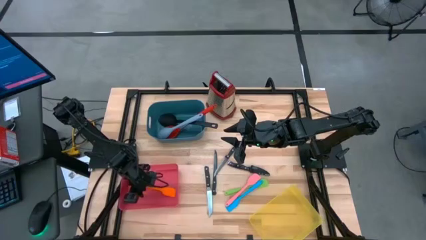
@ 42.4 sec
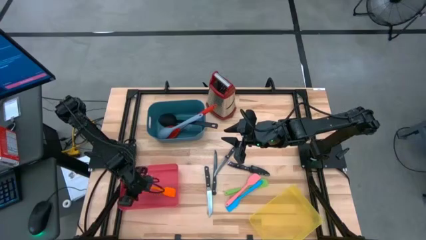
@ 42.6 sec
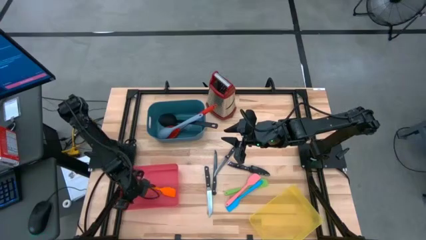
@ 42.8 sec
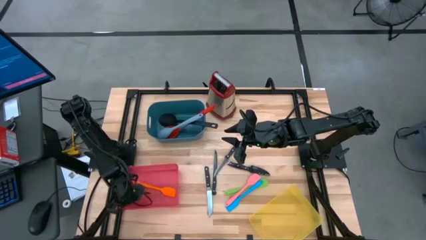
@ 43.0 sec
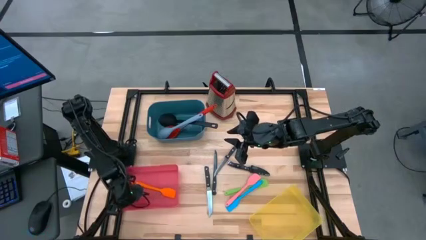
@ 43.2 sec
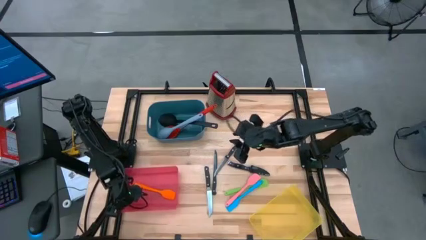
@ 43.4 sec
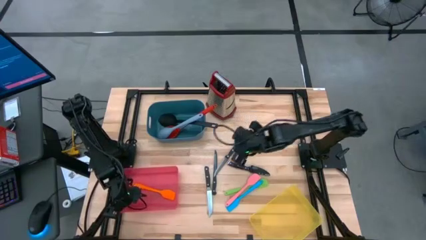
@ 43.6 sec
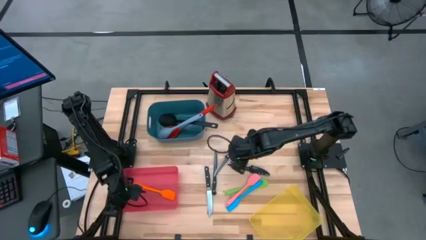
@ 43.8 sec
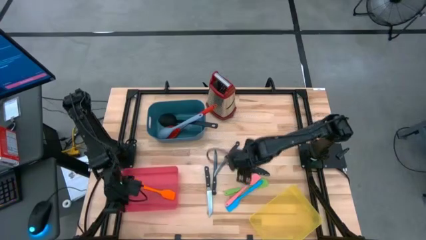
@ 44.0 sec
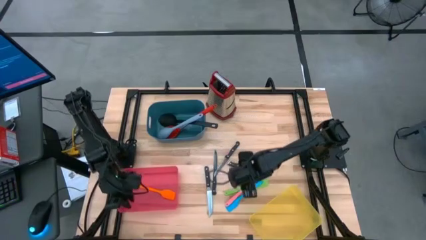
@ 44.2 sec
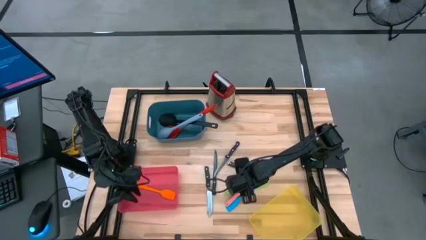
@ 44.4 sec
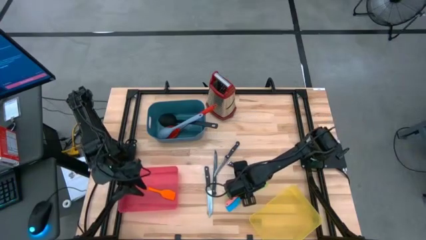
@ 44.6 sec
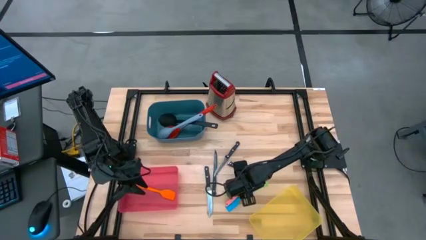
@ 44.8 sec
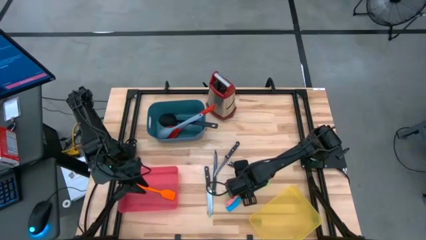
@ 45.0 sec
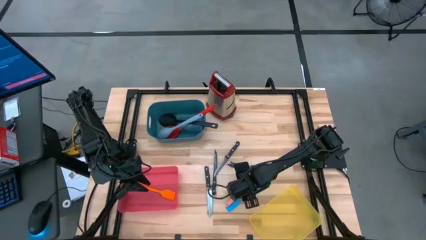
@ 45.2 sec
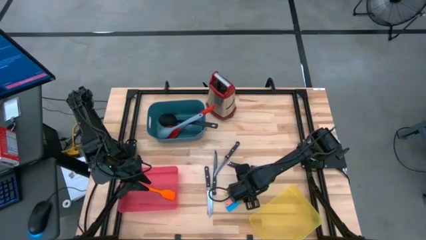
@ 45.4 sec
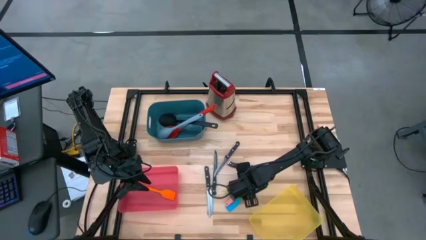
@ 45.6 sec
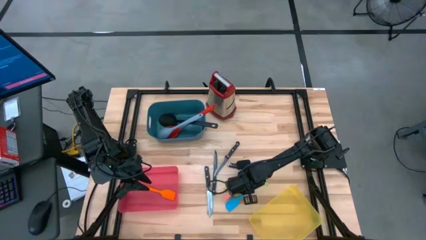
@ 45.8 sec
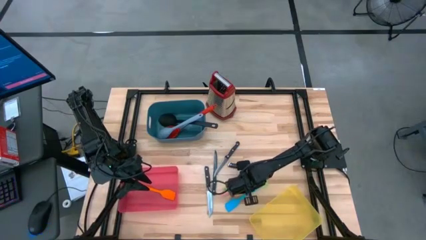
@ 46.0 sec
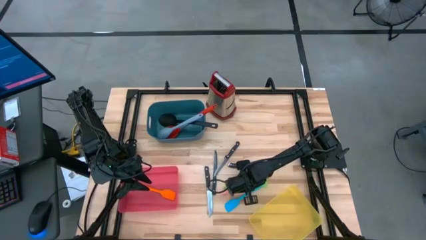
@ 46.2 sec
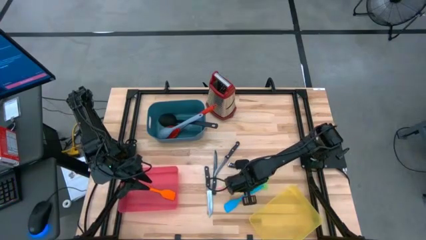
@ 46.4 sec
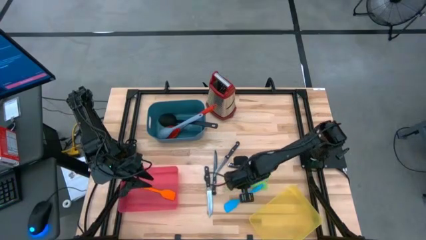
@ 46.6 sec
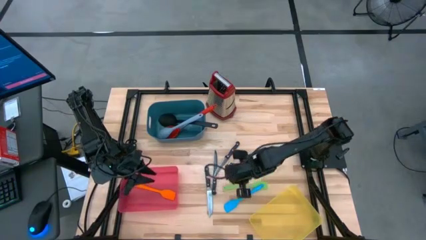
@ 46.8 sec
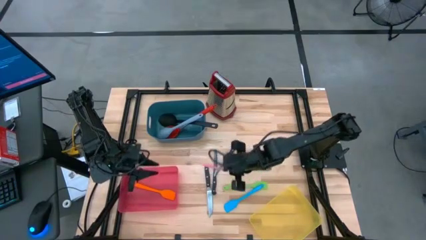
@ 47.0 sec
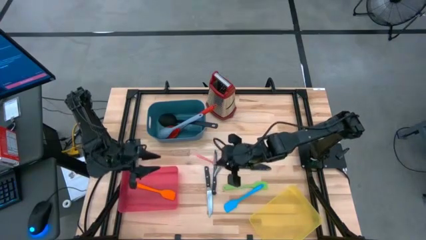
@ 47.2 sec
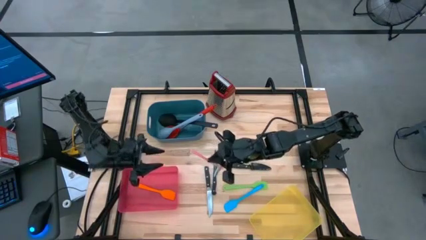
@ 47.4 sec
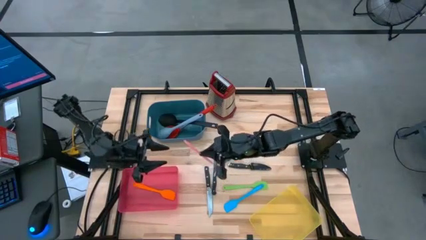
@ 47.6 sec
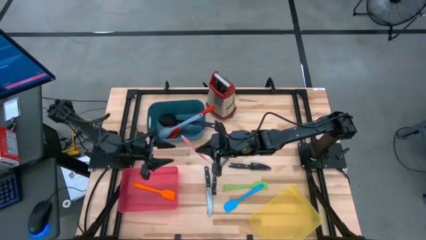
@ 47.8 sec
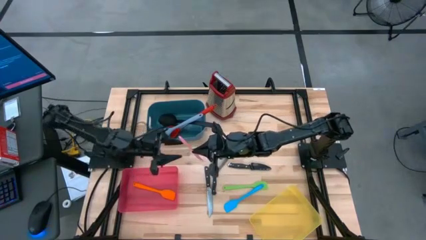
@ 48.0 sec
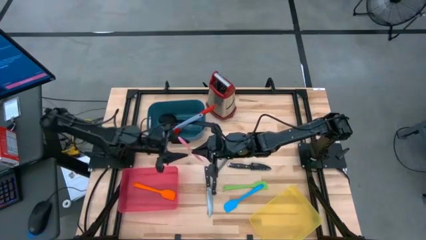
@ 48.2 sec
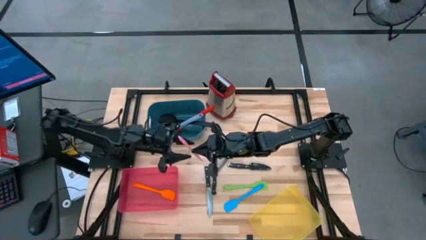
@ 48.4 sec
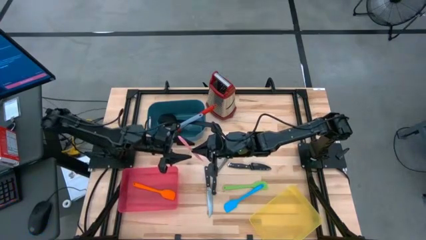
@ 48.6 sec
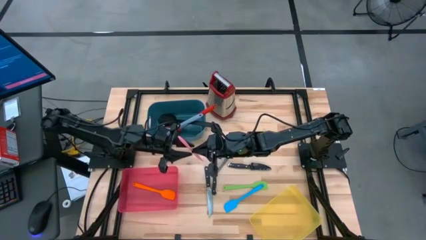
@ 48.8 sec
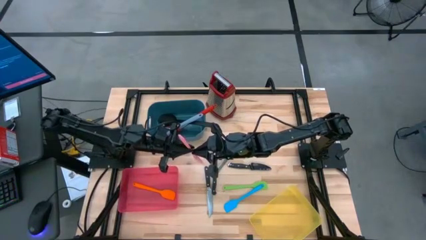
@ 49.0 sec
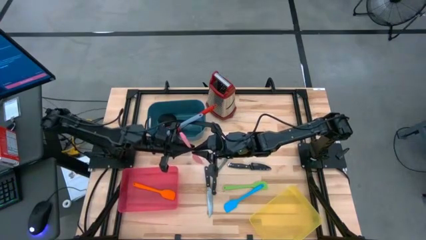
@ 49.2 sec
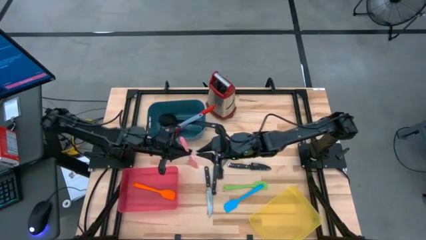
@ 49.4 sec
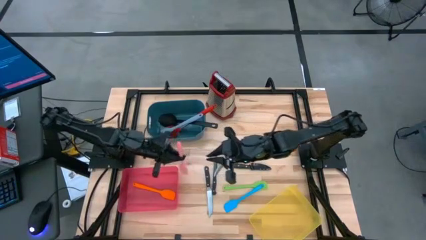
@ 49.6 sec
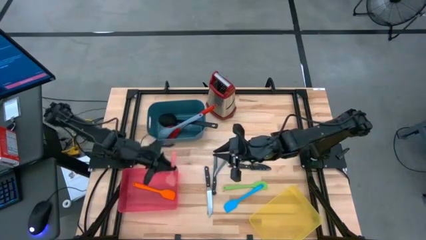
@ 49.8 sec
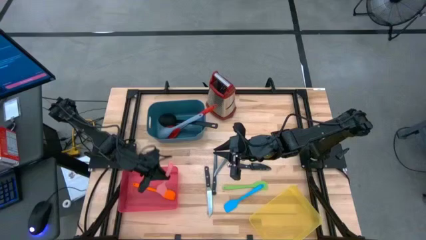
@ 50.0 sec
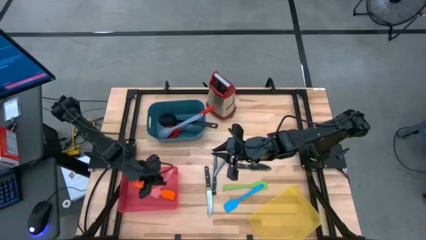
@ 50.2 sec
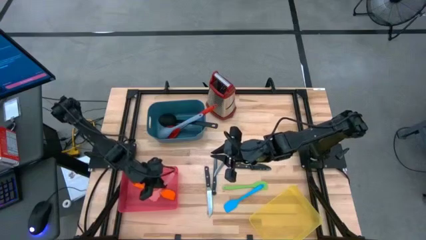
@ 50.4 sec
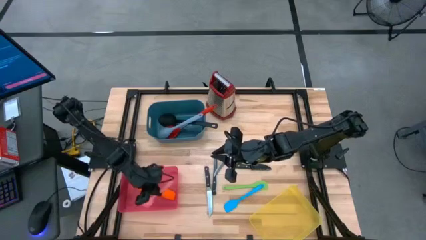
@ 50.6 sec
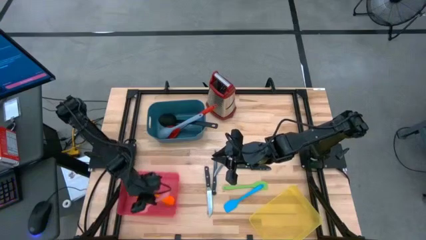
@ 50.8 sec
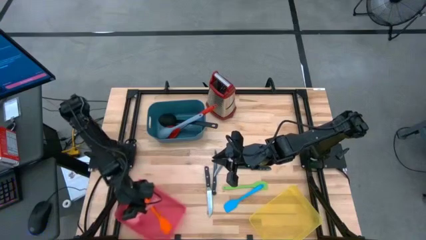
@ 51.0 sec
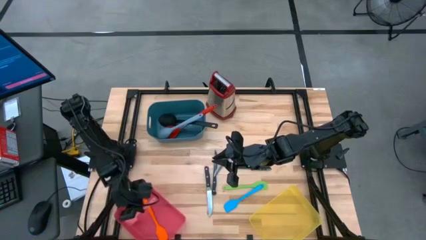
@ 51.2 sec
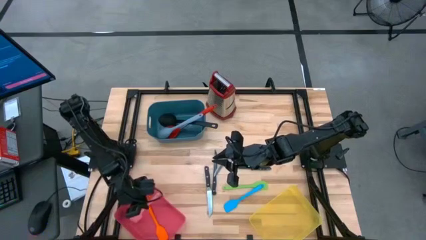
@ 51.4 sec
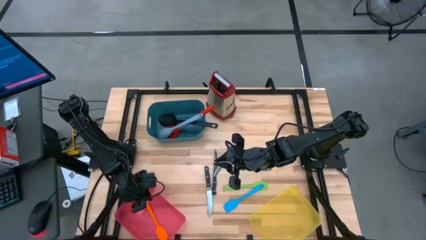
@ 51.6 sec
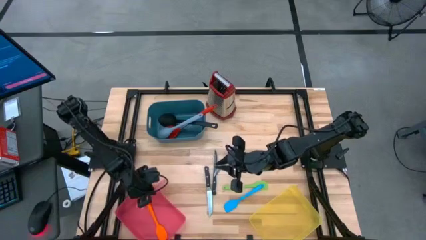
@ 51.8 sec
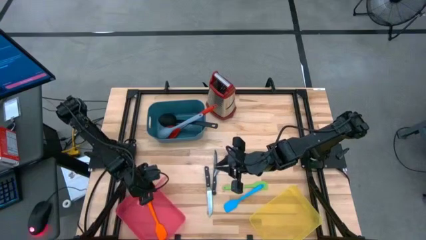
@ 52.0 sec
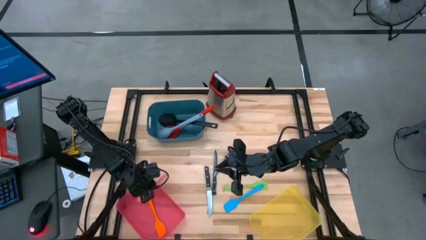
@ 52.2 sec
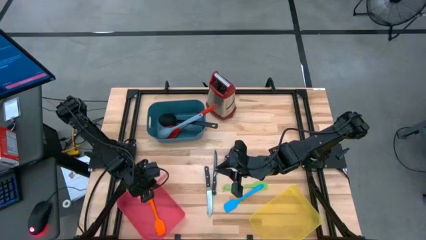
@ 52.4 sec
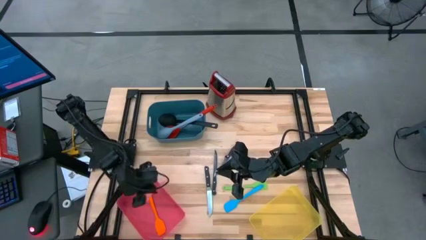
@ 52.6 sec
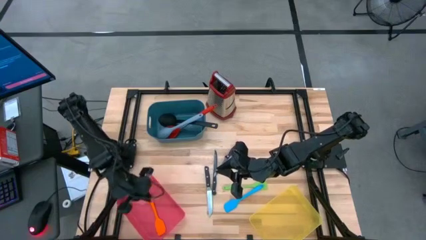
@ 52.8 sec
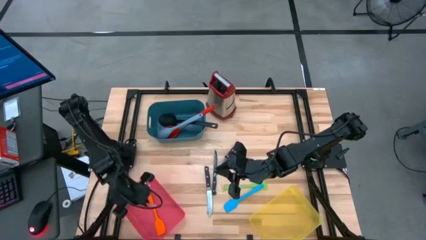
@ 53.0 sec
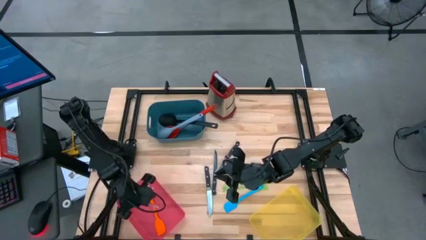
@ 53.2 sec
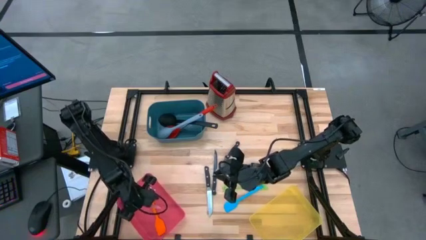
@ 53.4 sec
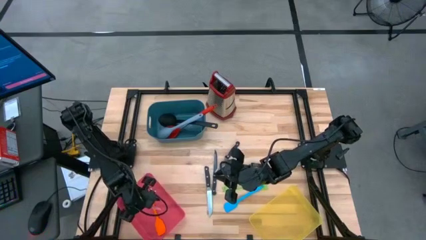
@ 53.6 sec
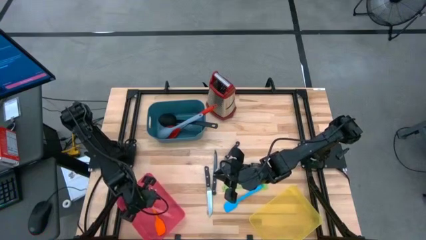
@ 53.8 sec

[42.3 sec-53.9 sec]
Task: Pick & Place Kitchen Items
Put the pink spatula into the pink bin

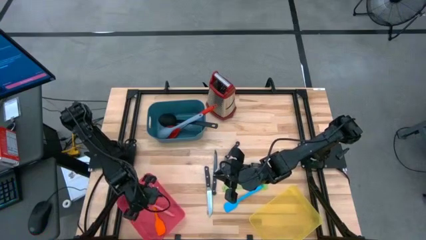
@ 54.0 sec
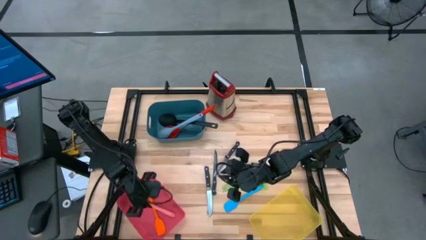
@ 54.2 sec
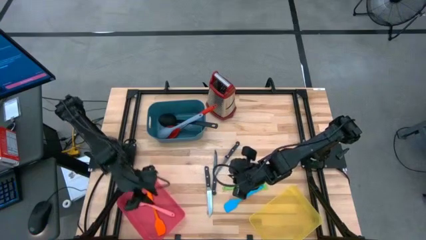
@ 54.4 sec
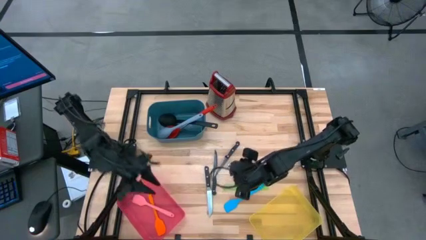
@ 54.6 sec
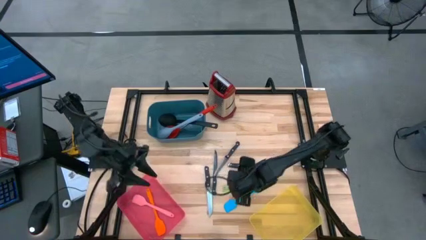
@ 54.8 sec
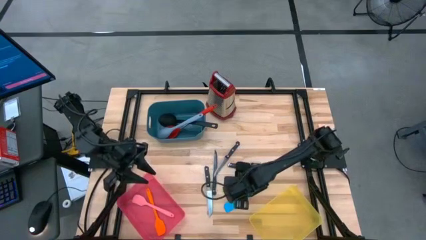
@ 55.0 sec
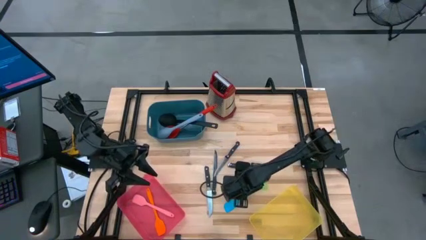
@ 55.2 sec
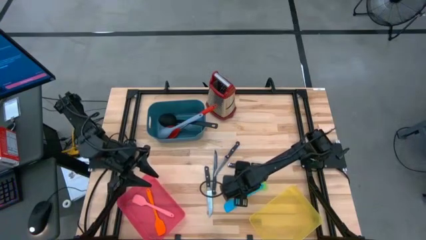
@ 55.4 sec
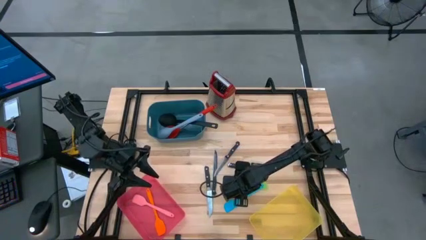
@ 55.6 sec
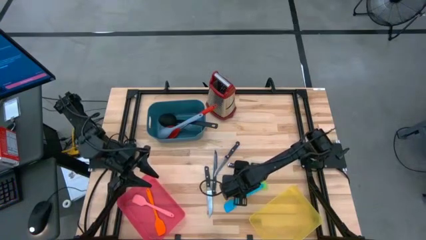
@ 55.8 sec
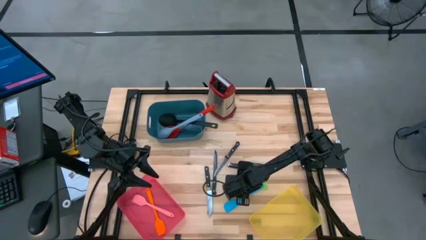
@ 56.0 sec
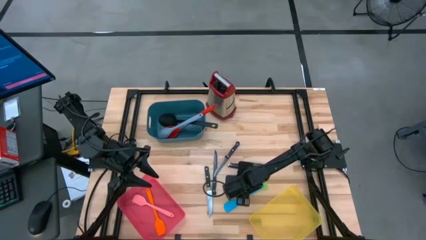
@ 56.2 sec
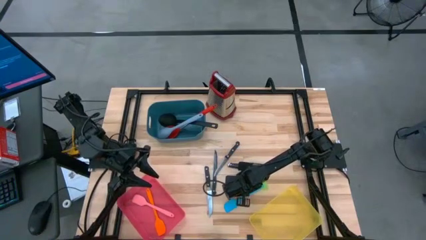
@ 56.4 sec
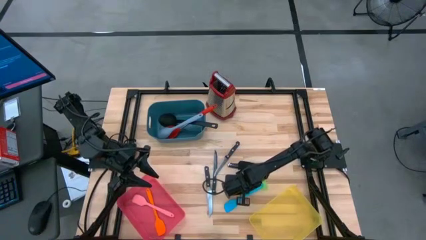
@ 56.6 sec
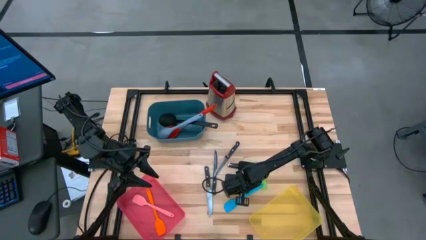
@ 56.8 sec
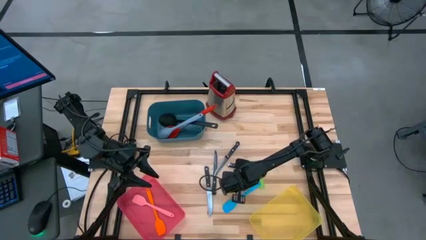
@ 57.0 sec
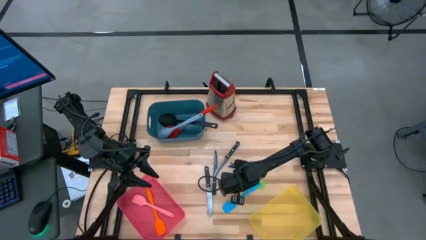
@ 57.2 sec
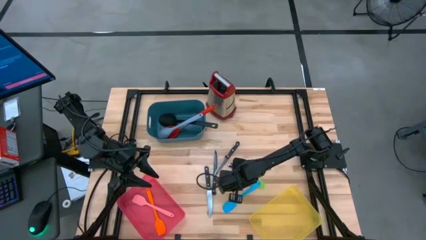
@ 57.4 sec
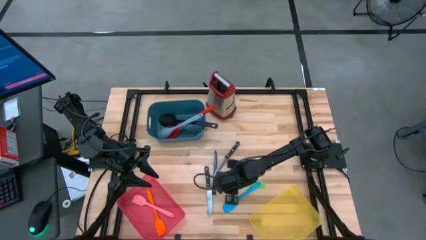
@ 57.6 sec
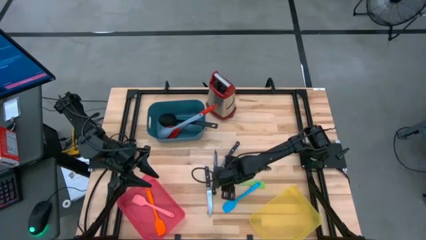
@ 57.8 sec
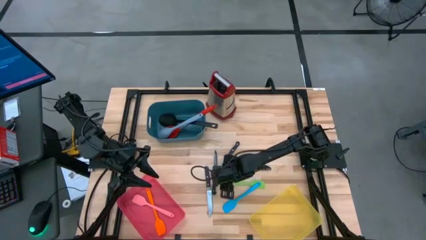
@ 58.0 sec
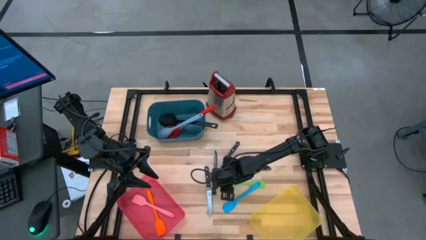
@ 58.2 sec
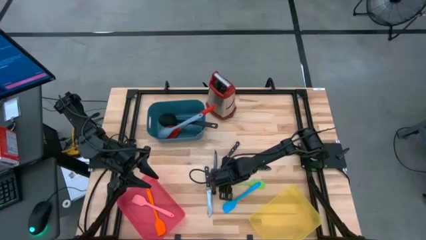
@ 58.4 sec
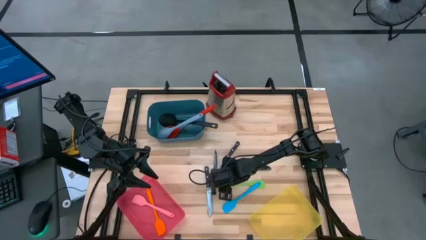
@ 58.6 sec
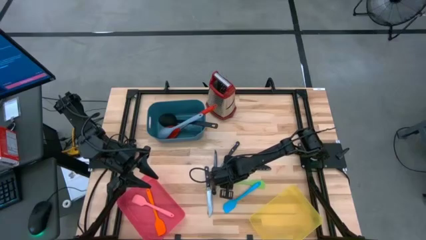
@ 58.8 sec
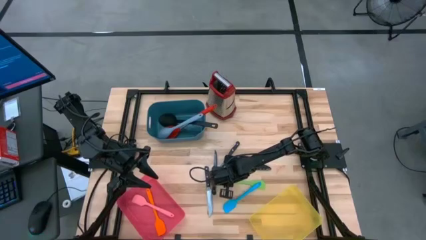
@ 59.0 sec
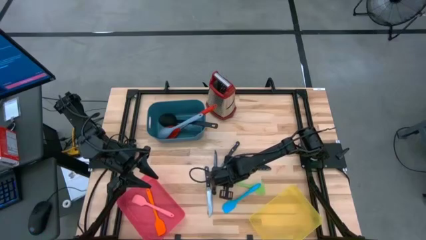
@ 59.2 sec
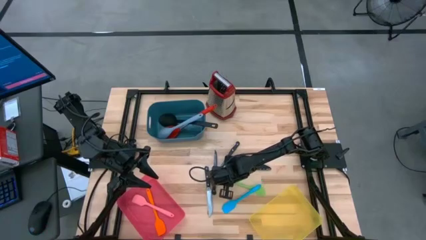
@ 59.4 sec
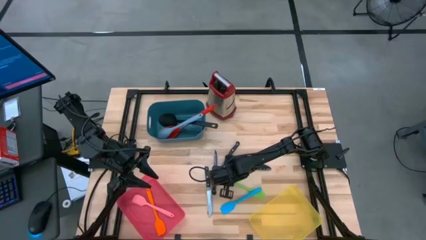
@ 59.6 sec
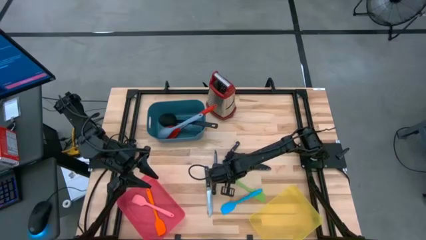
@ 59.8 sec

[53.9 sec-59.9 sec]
Put the green spatula into the pink bin
